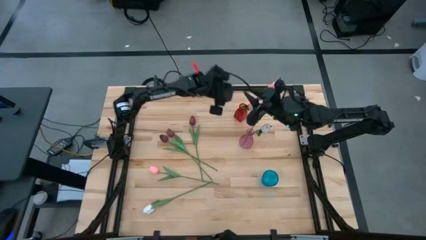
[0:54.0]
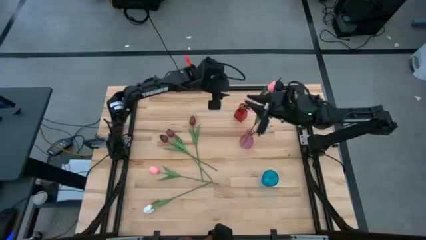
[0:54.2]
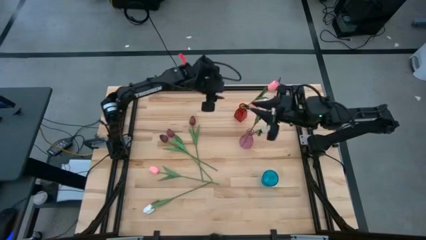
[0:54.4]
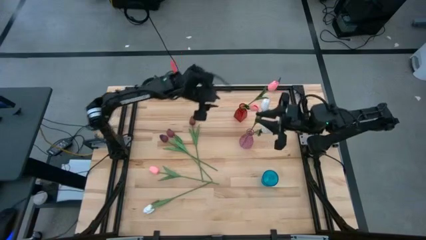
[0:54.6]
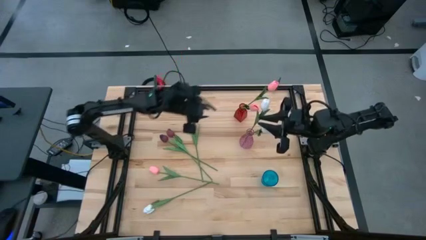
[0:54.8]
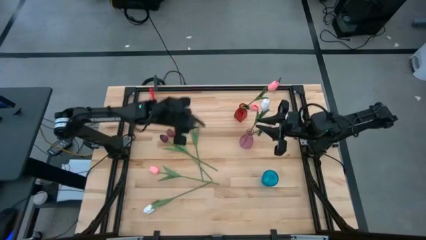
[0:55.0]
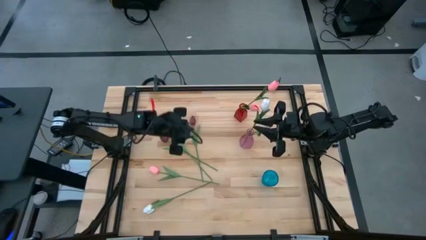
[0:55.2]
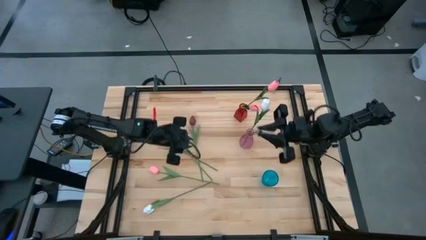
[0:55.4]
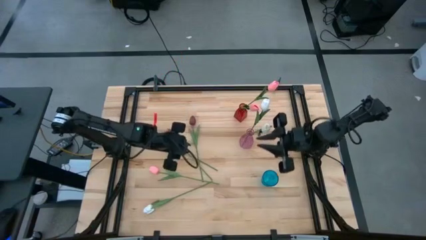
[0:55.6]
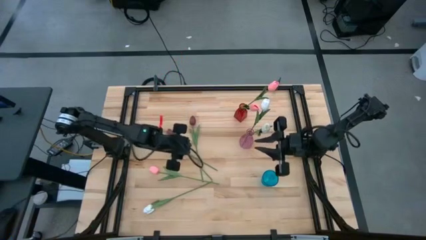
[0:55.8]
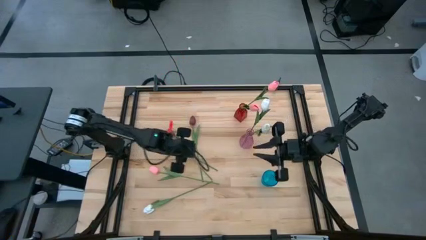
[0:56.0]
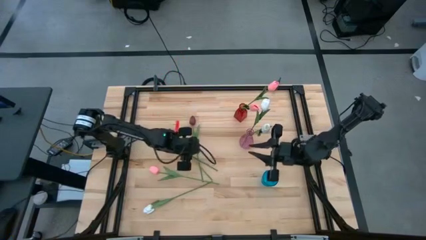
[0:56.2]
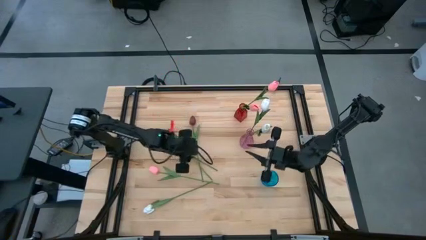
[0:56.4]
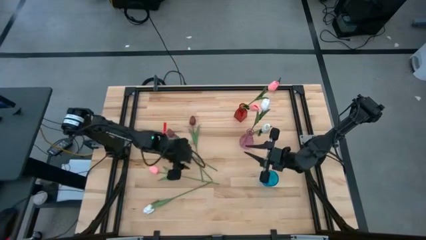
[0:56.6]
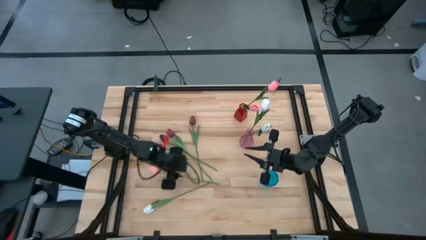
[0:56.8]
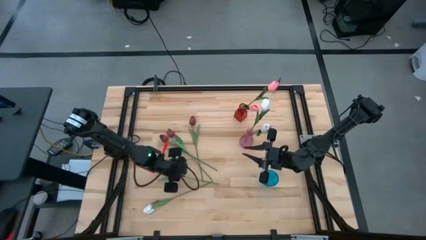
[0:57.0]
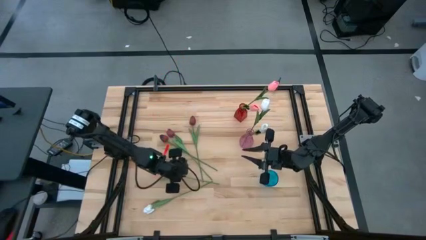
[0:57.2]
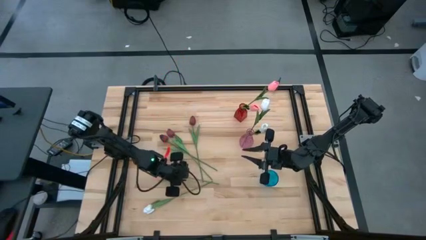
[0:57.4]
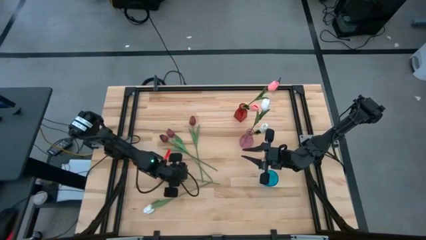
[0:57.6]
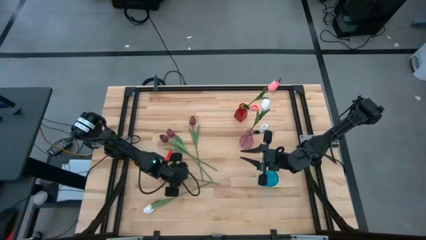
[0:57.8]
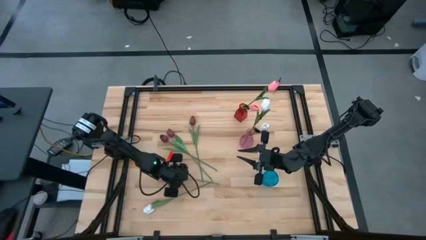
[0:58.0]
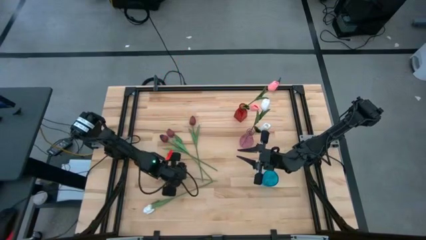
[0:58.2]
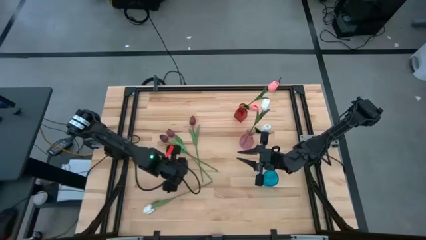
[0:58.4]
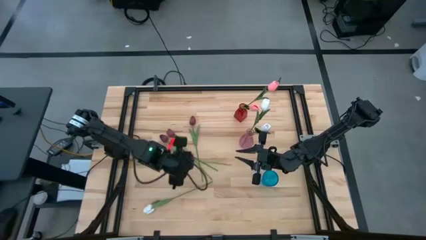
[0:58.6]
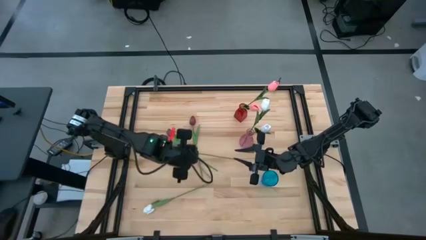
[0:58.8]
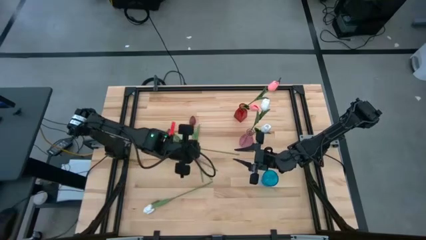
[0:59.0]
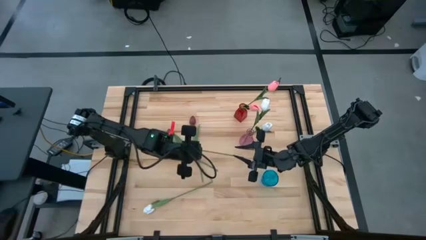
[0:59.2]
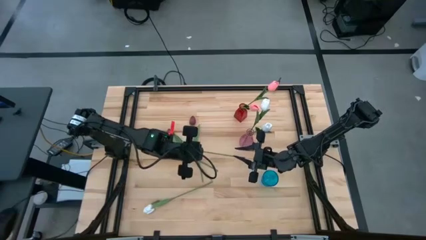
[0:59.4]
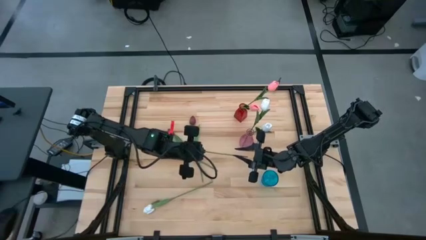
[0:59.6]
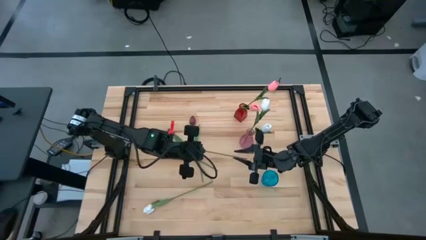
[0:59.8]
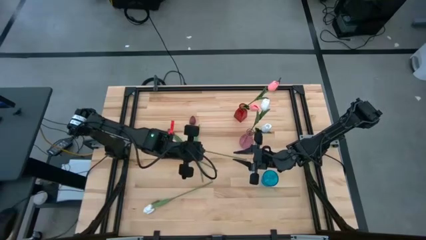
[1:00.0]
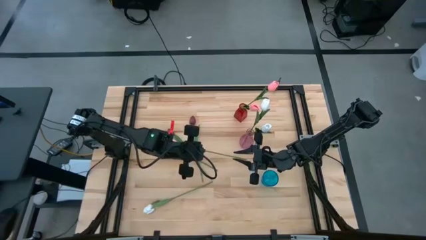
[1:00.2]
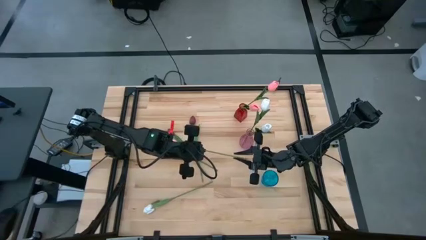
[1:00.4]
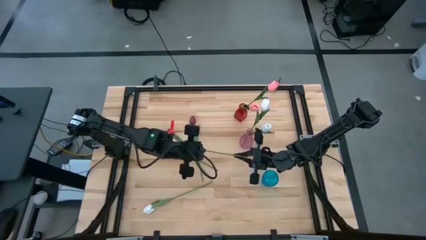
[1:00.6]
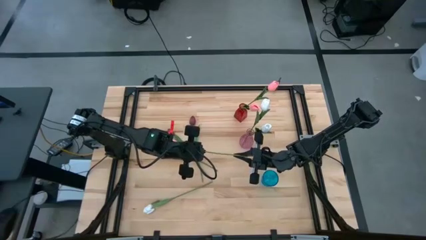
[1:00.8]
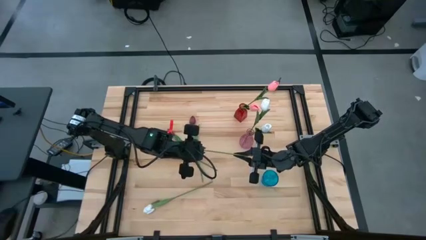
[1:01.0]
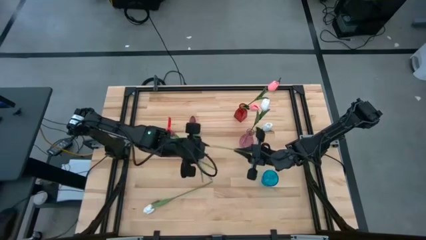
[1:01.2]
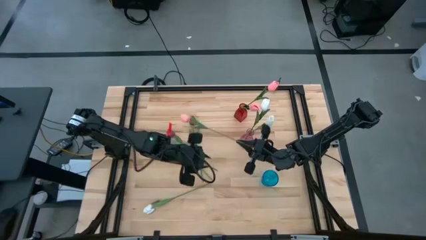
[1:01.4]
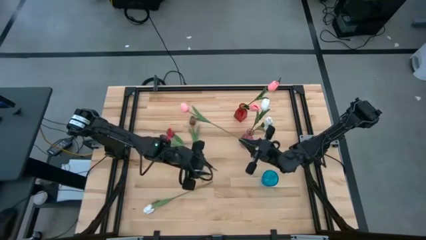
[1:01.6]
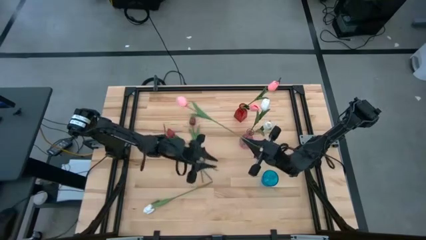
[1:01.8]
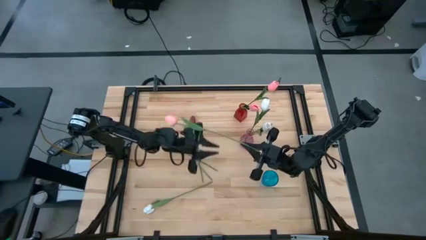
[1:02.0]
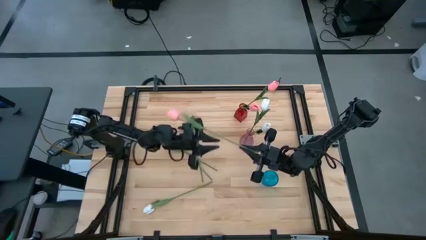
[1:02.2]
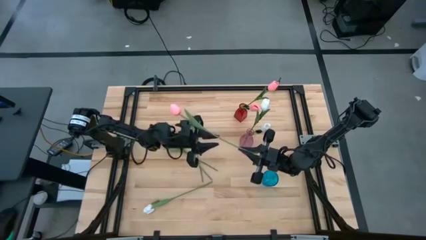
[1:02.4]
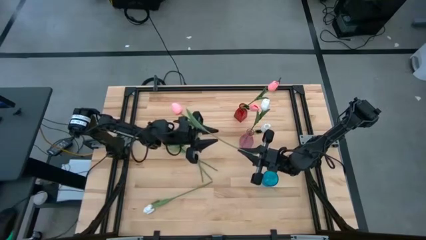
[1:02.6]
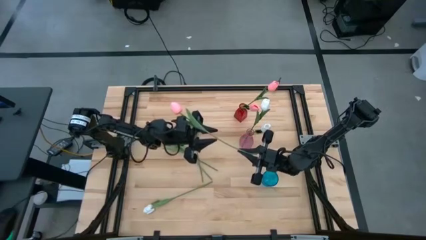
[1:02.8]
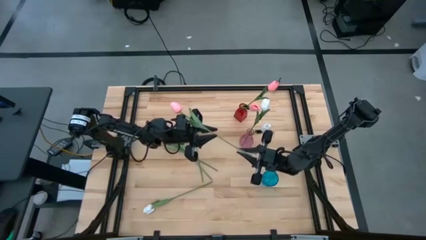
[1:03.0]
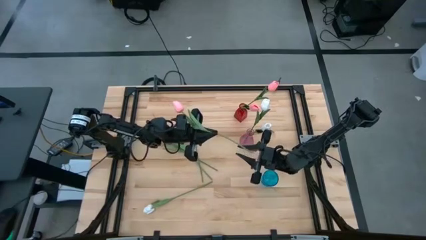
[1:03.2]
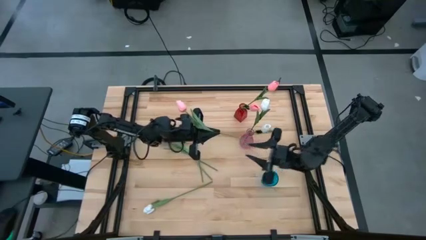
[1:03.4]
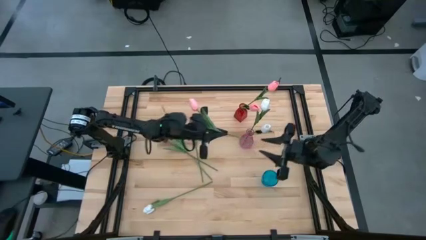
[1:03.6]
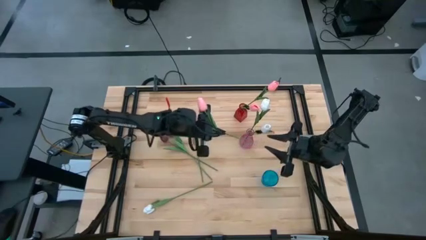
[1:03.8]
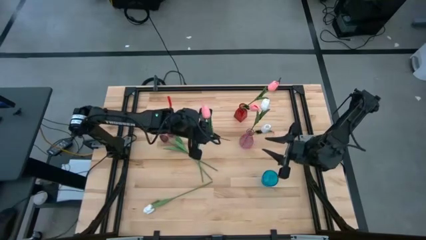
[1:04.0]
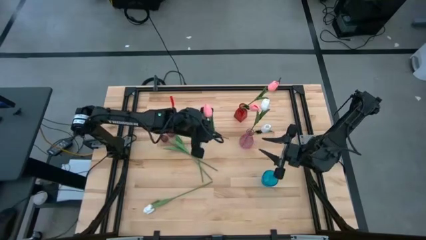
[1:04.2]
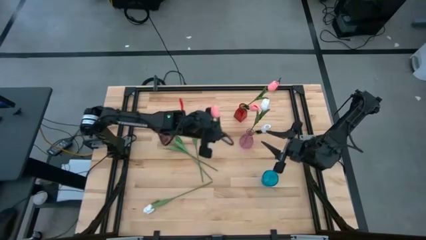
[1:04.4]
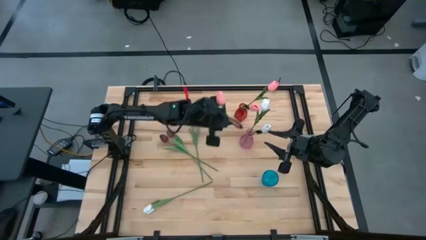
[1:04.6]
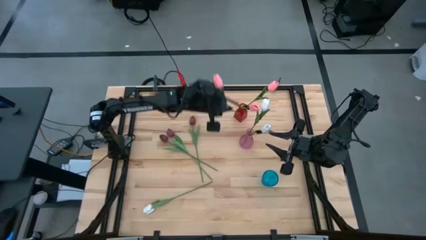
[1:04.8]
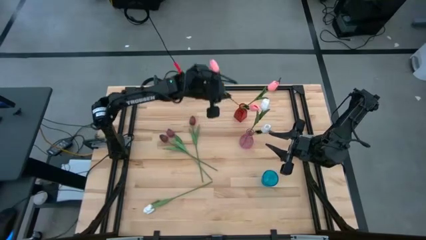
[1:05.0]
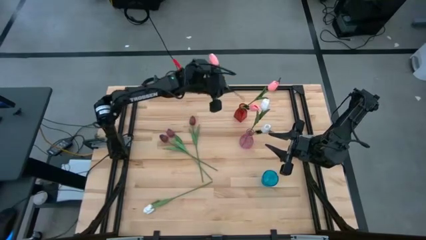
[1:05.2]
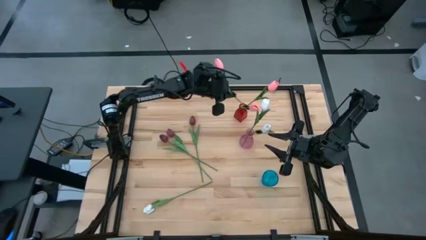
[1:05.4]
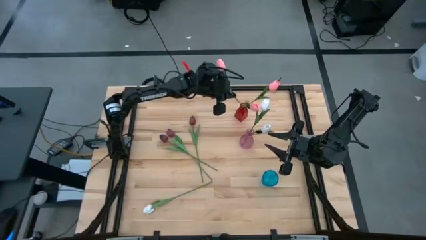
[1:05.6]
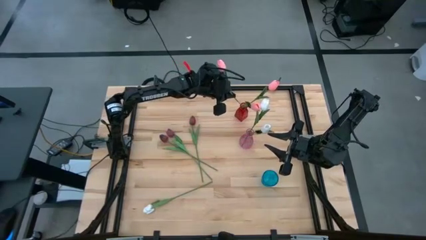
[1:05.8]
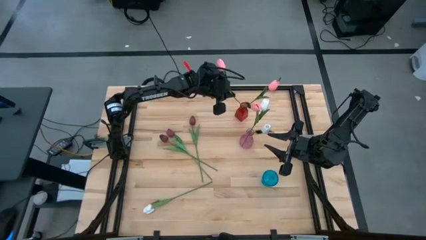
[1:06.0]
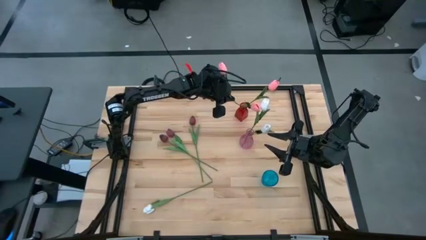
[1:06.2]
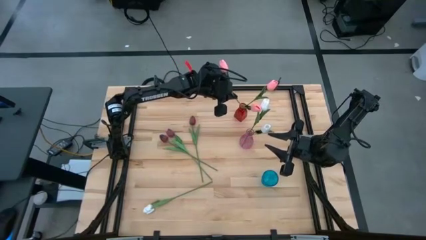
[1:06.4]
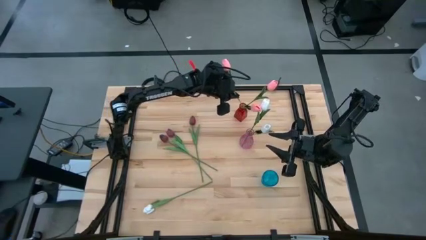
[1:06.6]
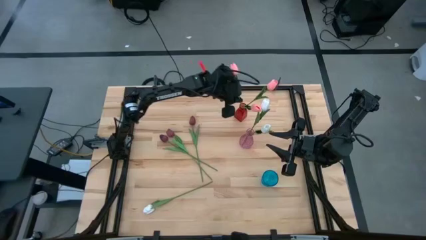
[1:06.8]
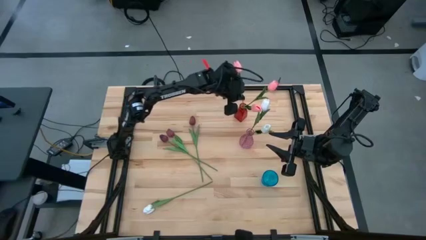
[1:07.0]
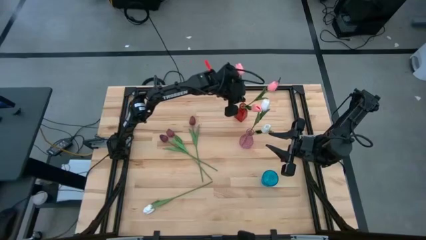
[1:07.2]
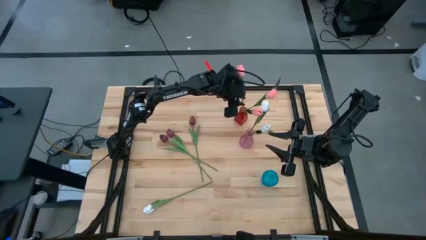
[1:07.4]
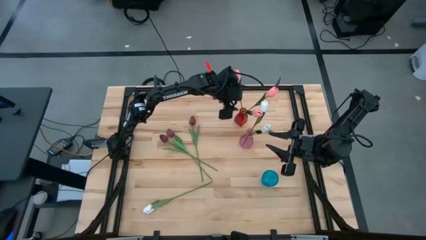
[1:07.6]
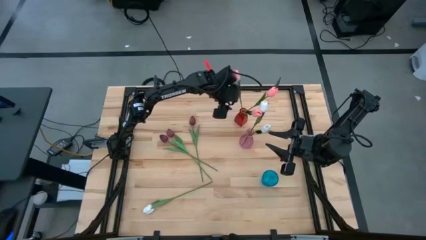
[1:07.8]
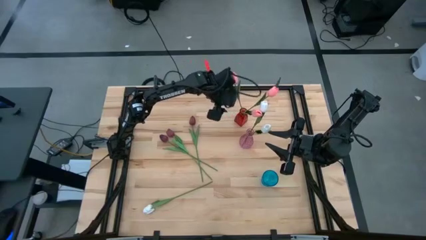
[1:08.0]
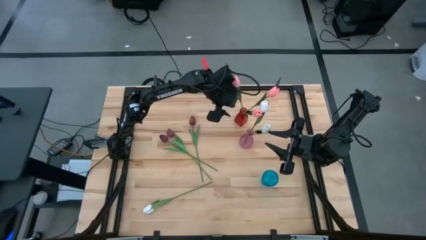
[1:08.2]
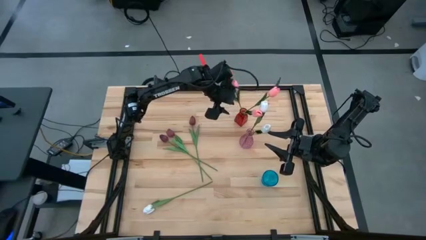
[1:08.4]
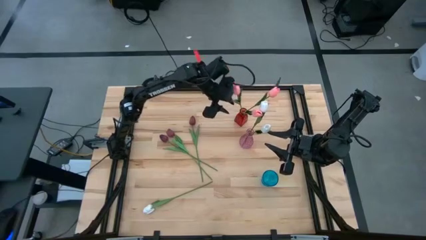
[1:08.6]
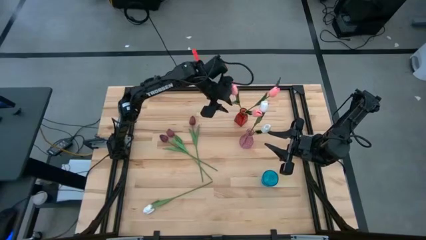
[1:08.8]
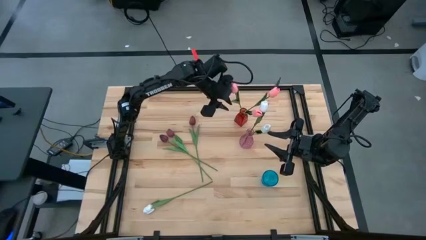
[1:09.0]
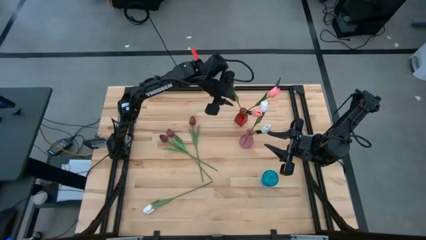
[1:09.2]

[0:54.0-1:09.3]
Task: Sort flowers into vase by color
Put the pink tulip into the red vase

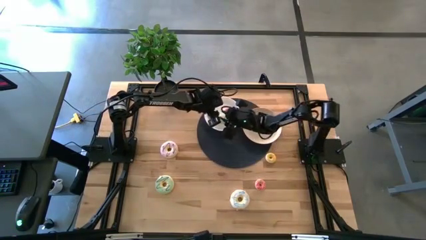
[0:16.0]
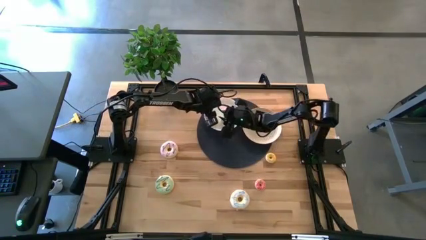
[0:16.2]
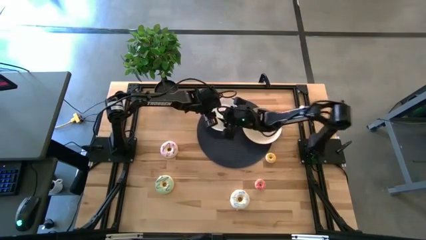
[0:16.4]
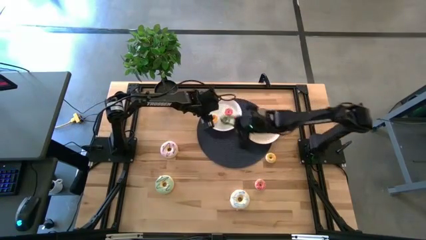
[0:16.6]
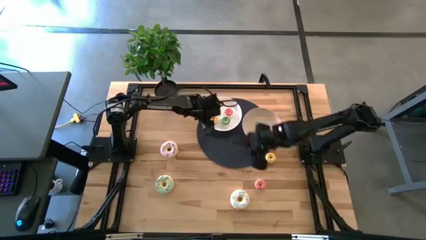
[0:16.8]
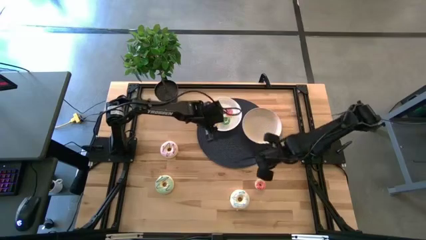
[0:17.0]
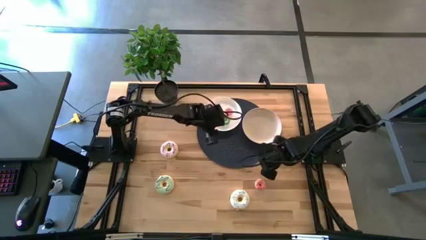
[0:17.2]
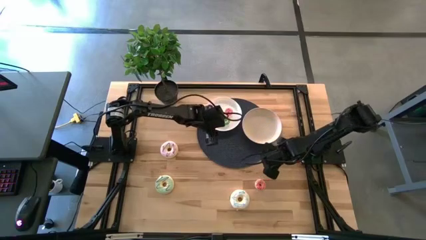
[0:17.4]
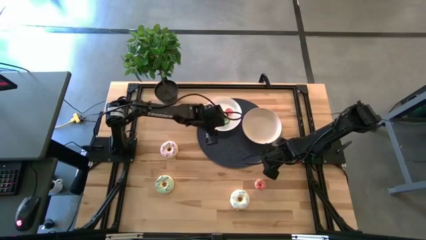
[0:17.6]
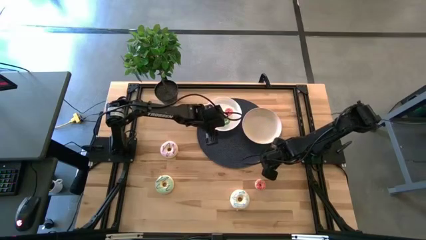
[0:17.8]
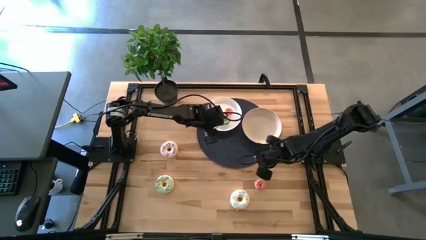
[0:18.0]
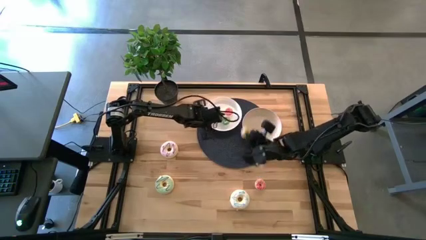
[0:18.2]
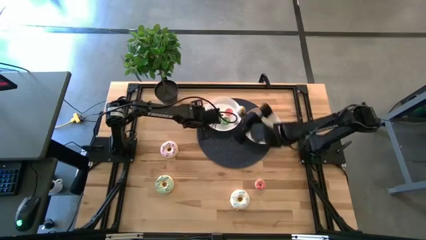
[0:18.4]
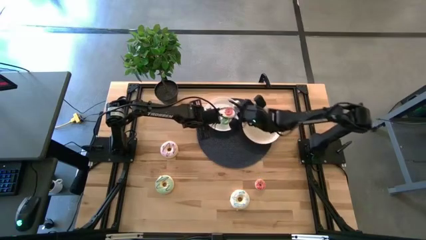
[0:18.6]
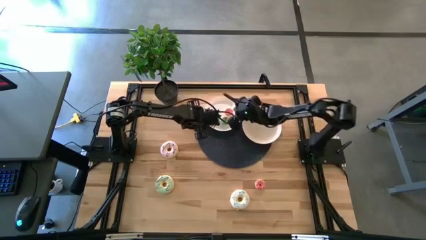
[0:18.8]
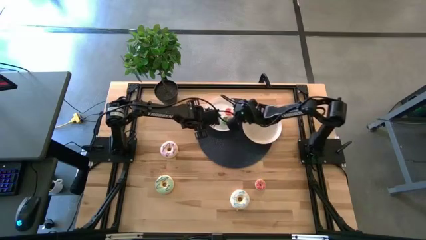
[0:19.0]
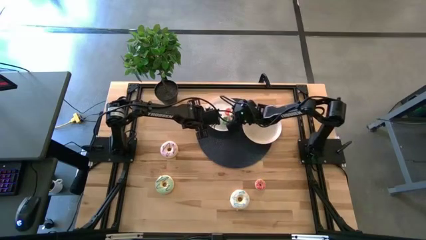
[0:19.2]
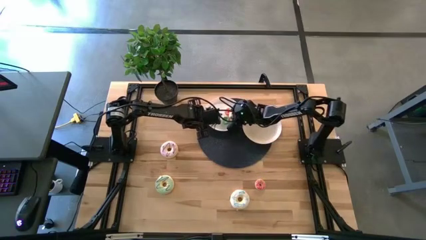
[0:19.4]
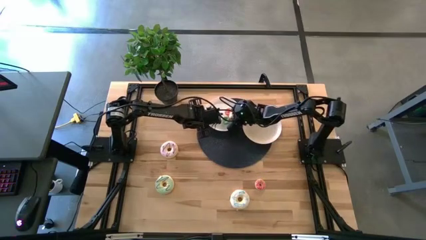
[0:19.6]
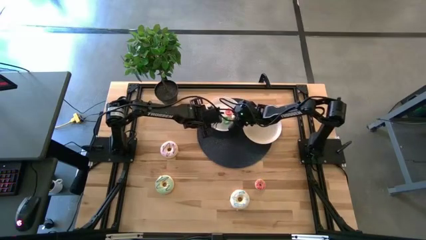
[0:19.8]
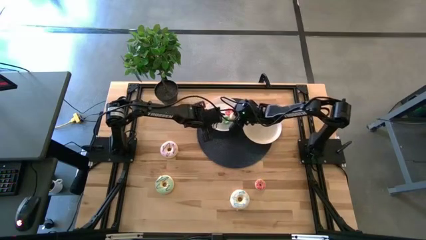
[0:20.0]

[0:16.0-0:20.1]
Task: Pick & Place donuts
Put the small yellow donut on the white plate
